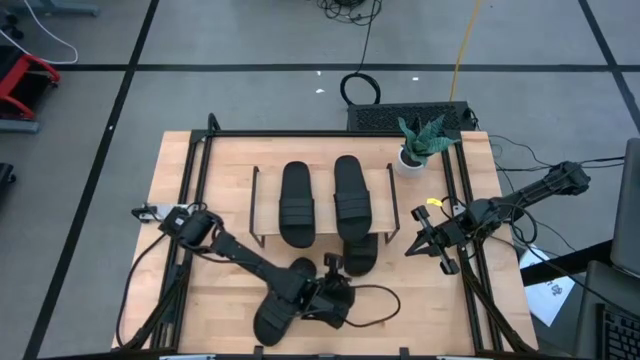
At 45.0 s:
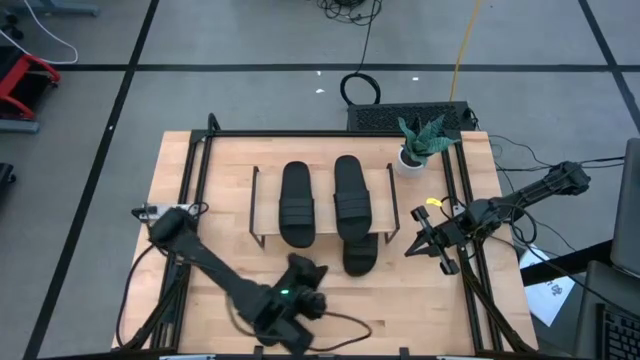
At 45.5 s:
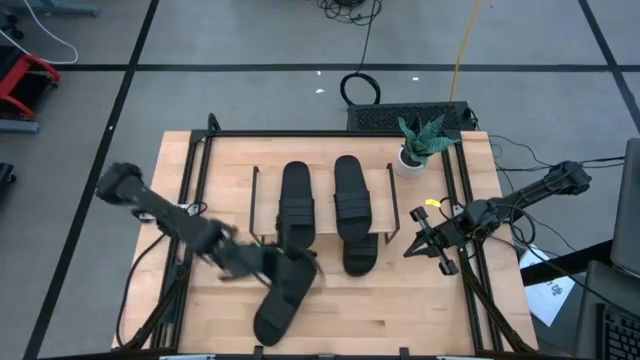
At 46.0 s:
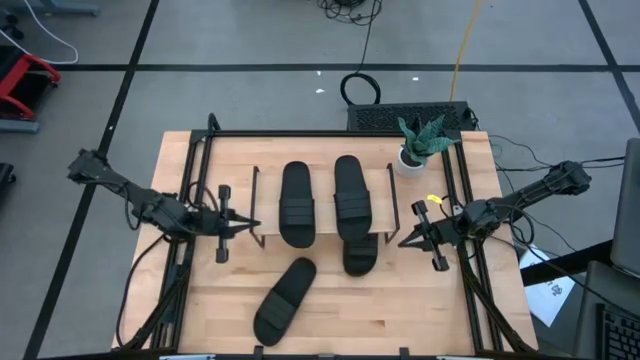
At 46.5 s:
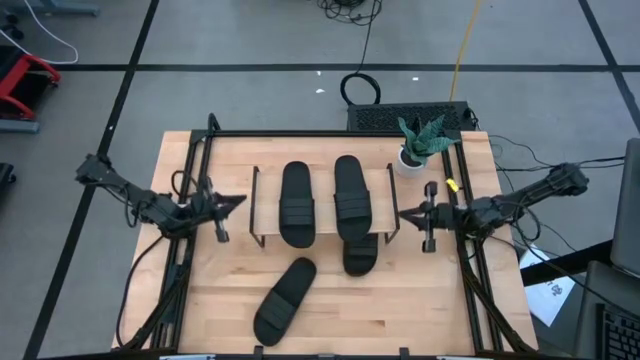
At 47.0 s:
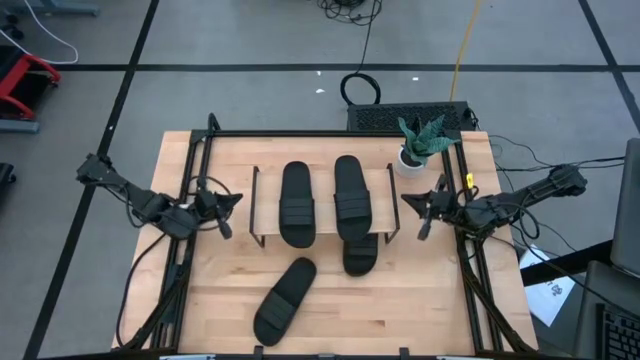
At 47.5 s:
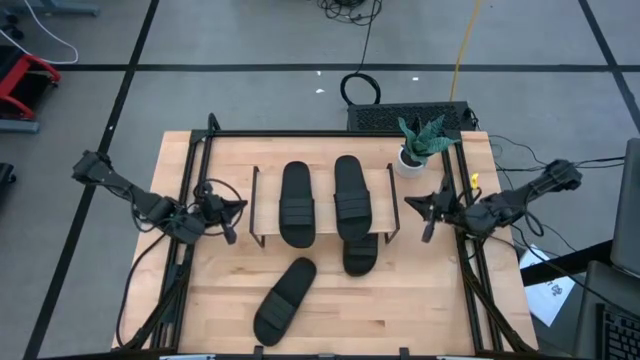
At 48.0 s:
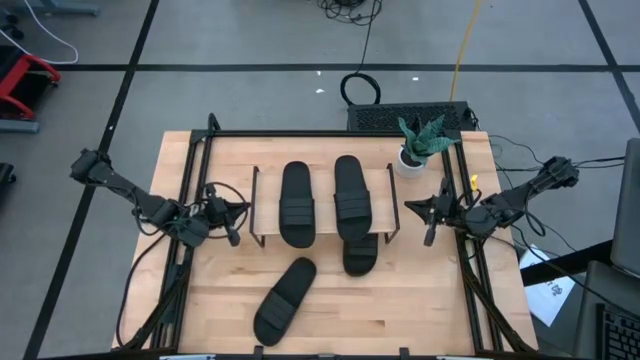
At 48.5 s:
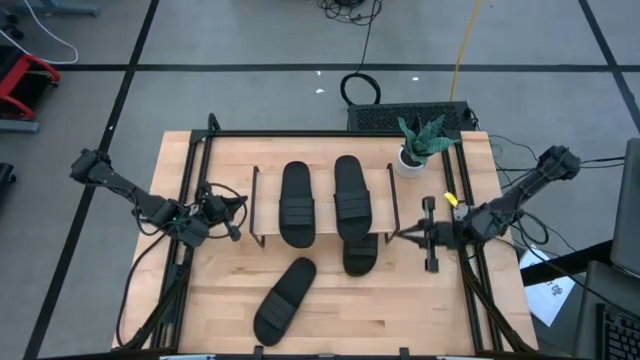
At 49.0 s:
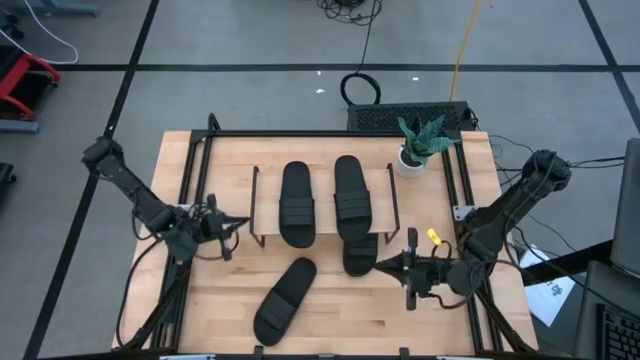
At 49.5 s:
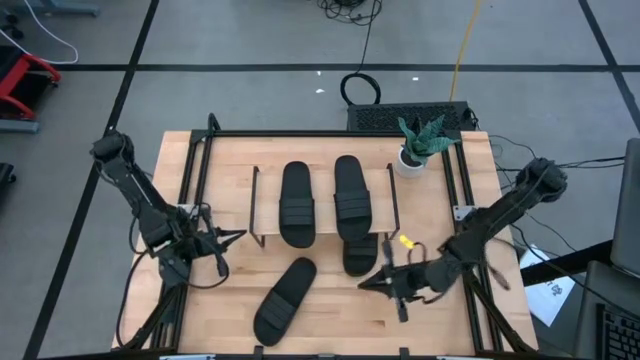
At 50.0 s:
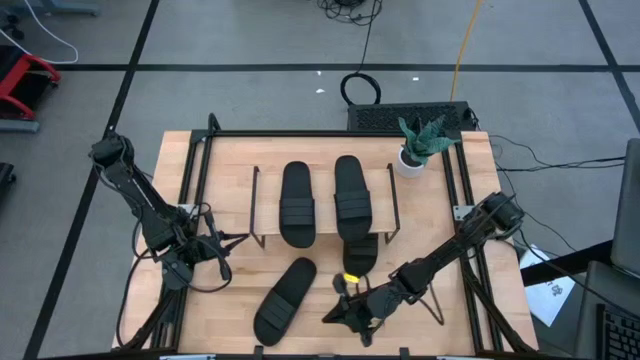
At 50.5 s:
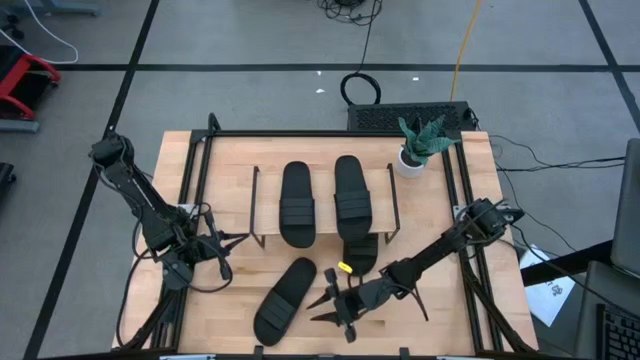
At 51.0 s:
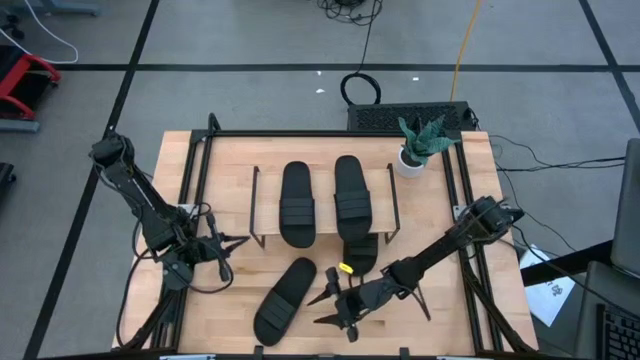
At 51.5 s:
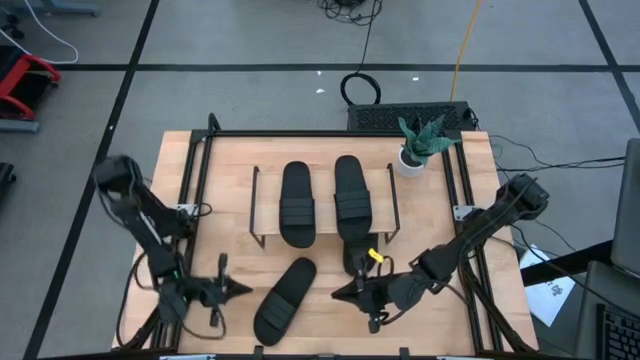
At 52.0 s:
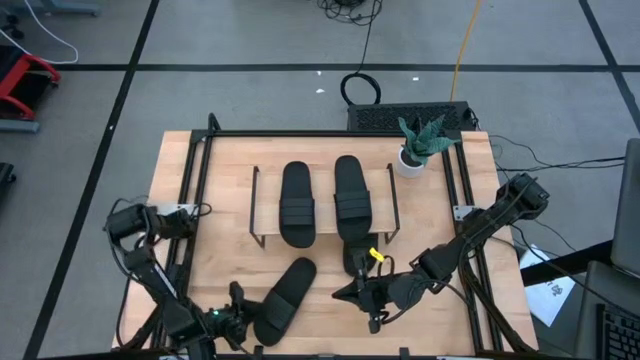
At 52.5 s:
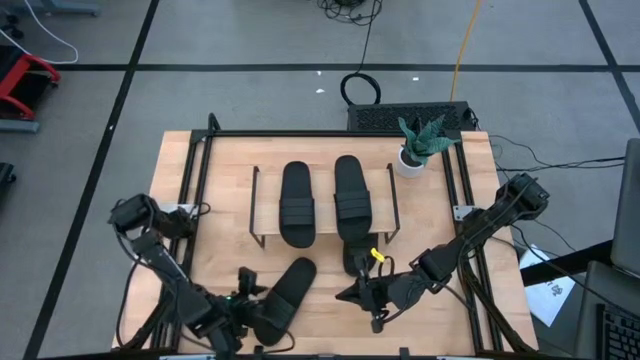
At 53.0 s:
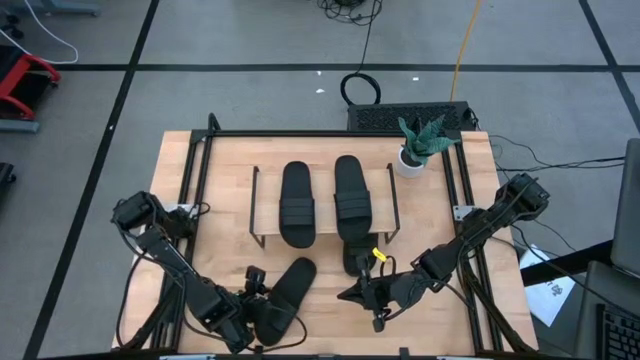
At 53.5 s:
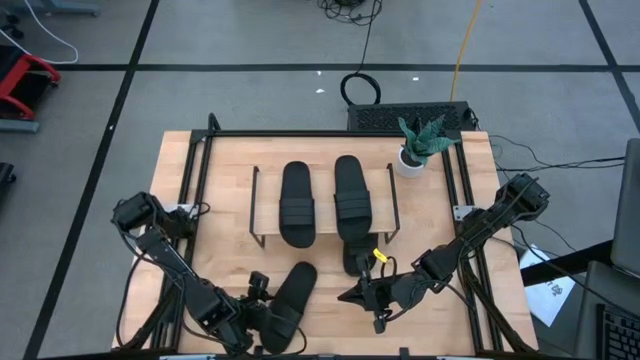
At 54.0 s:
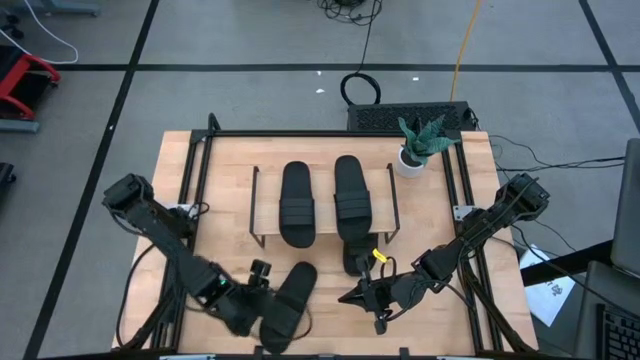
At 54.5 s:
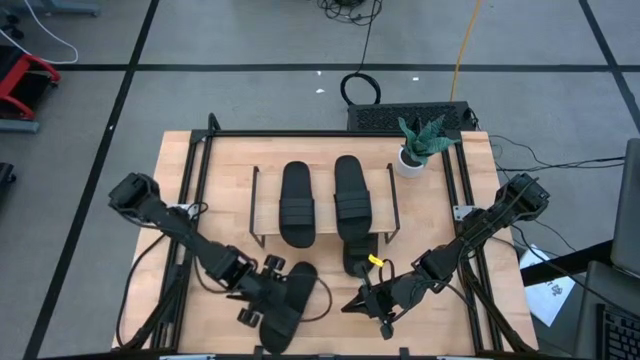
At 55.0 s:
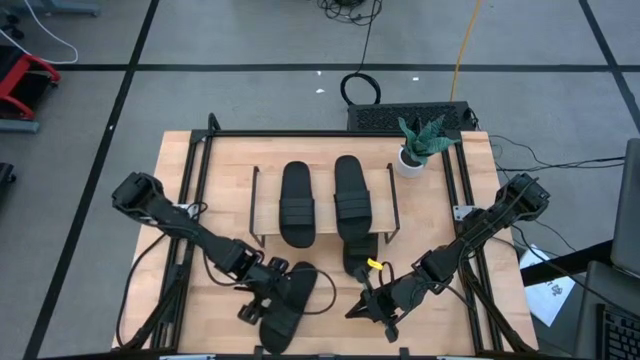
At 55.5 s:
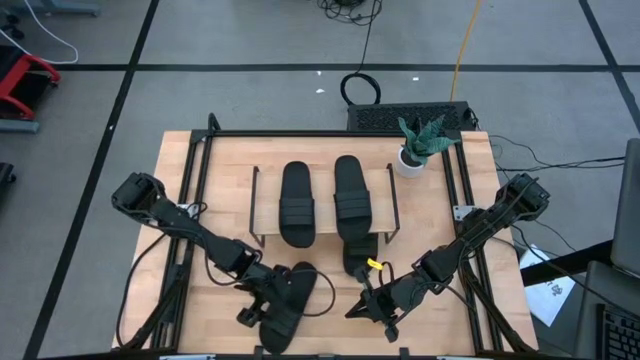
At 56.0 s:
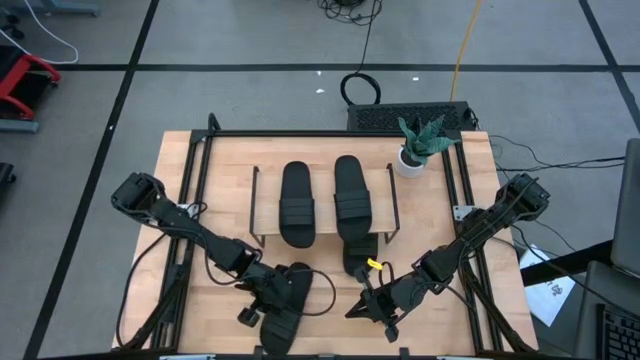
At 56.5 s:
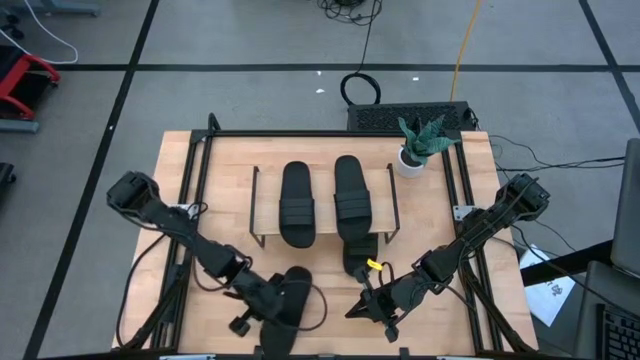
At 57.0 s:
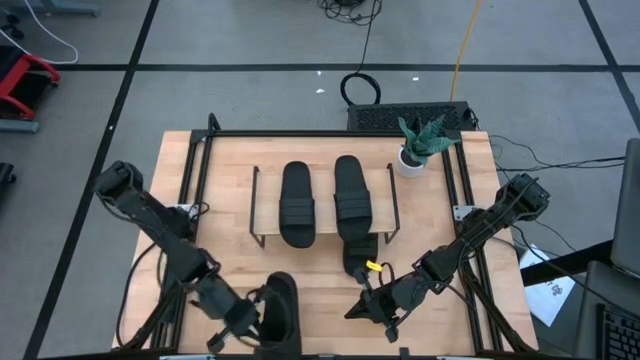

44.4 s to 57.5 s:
Task: Pick and place slides into the shelf
Put the black slide under the shelf

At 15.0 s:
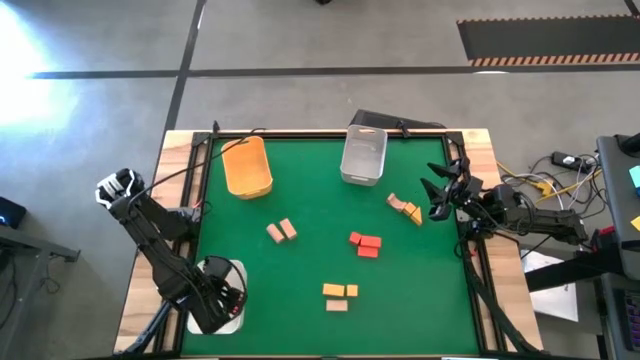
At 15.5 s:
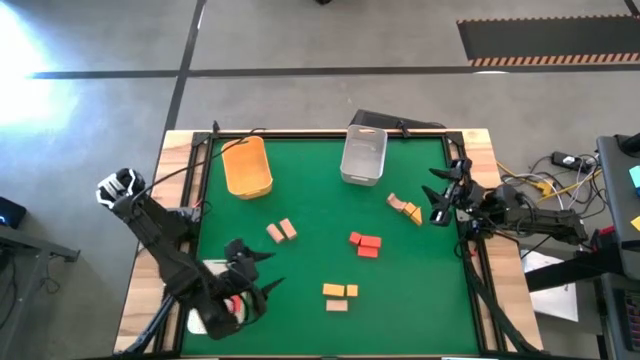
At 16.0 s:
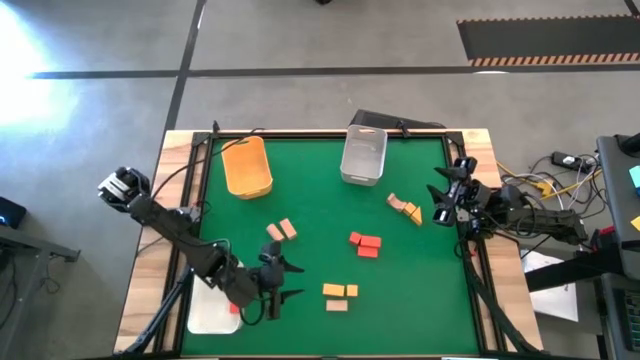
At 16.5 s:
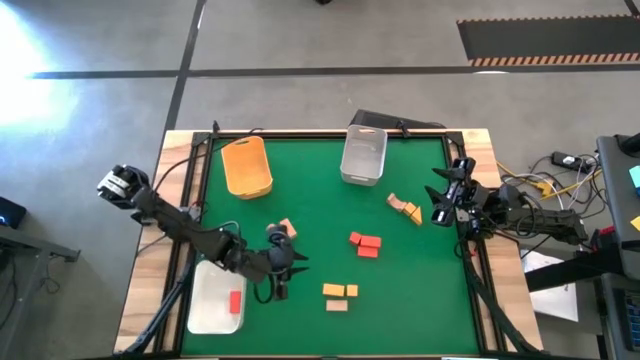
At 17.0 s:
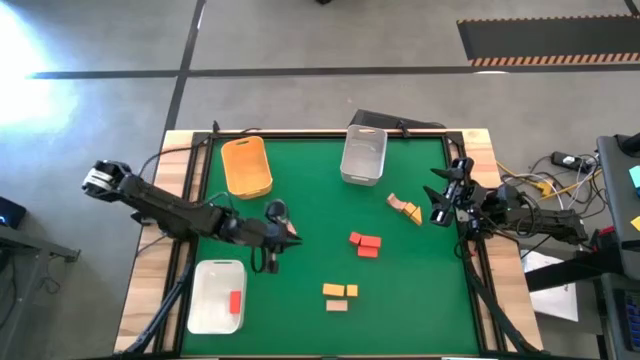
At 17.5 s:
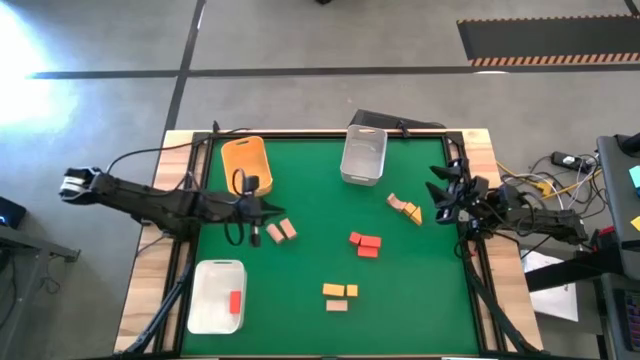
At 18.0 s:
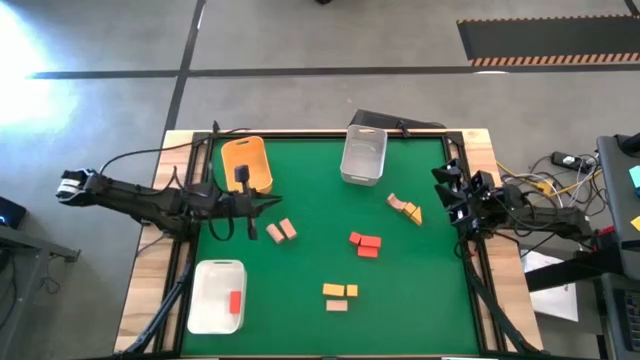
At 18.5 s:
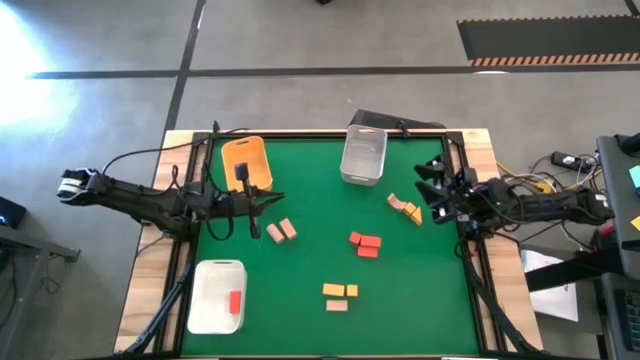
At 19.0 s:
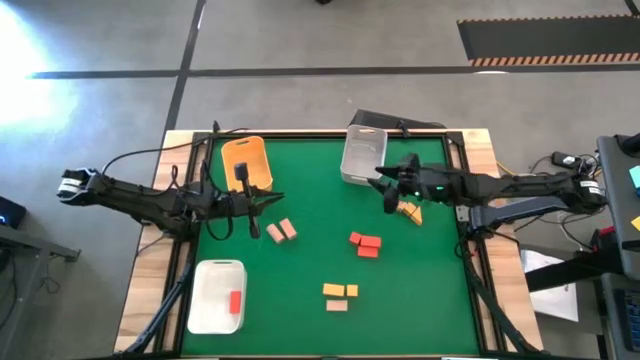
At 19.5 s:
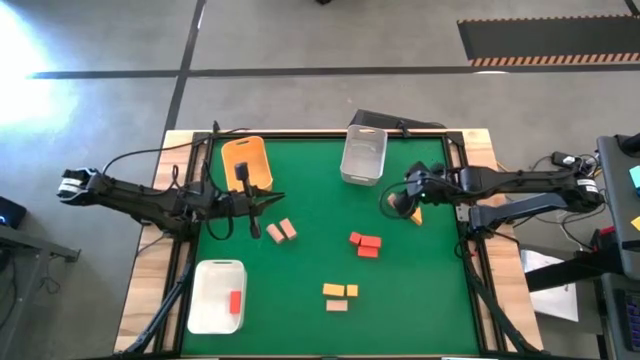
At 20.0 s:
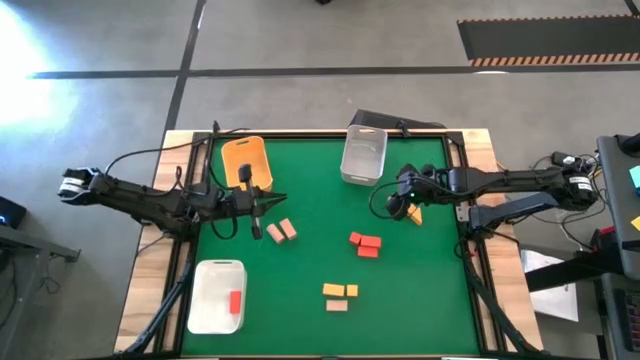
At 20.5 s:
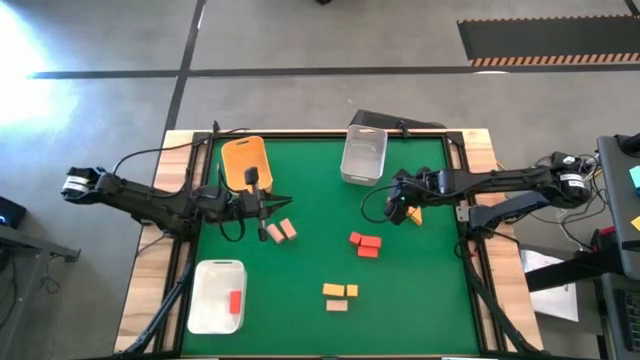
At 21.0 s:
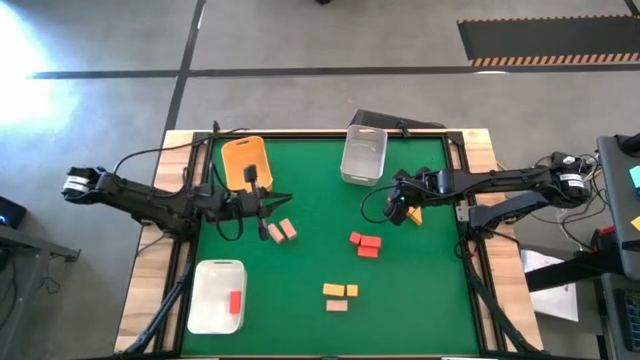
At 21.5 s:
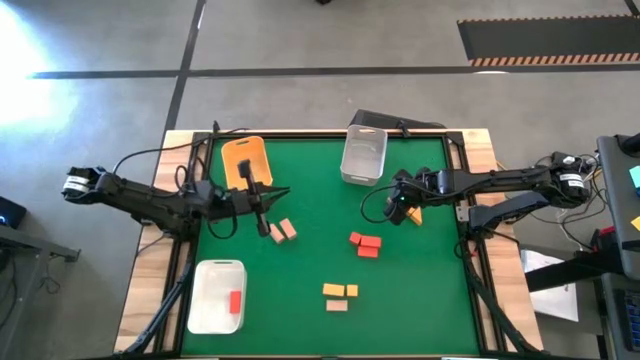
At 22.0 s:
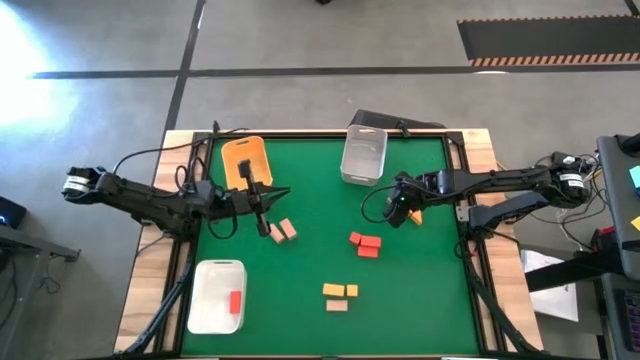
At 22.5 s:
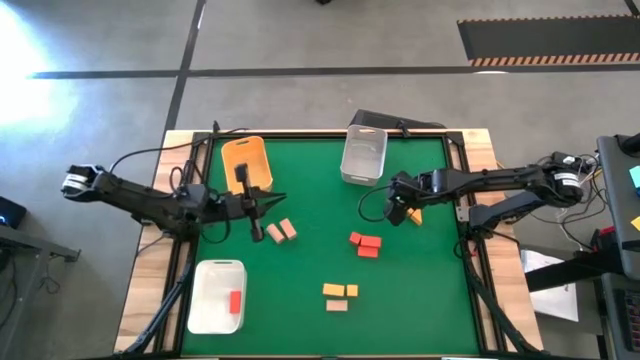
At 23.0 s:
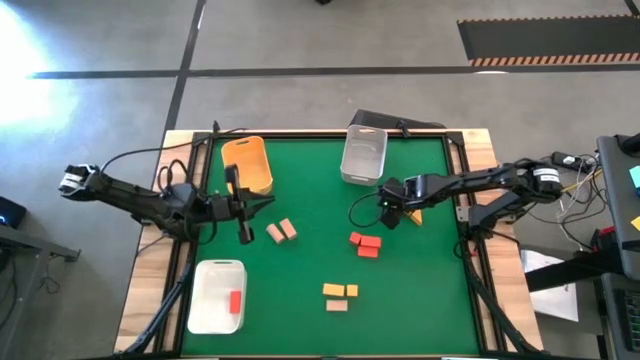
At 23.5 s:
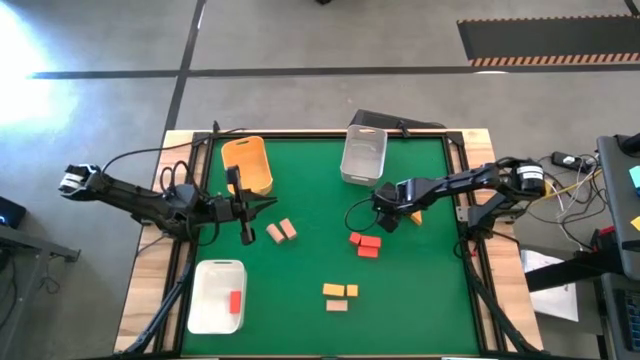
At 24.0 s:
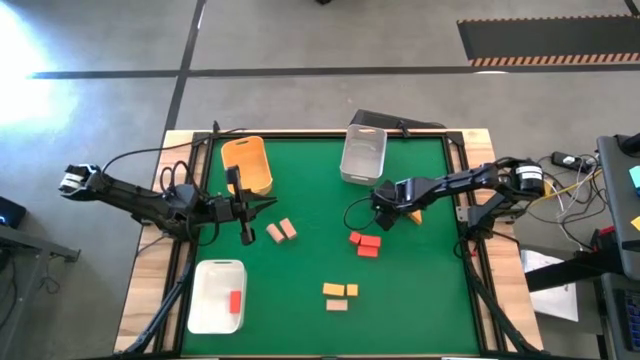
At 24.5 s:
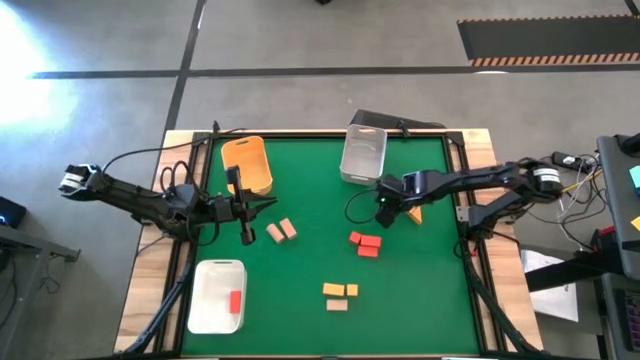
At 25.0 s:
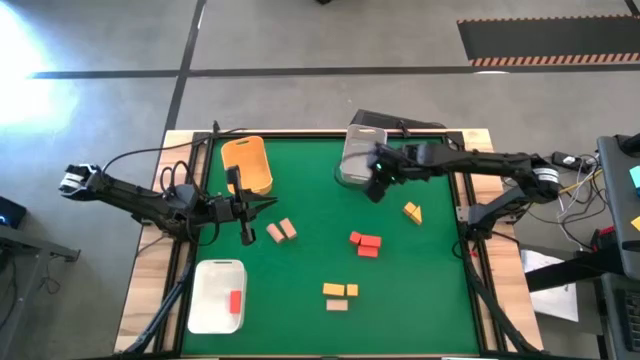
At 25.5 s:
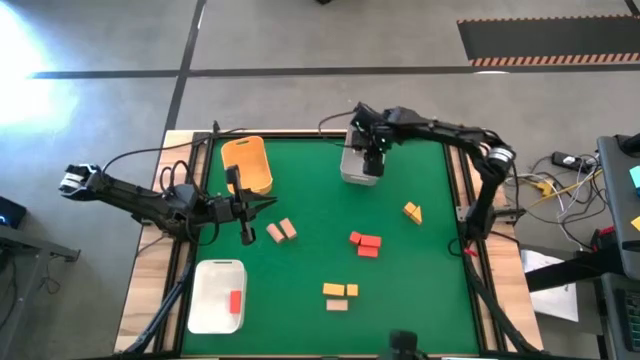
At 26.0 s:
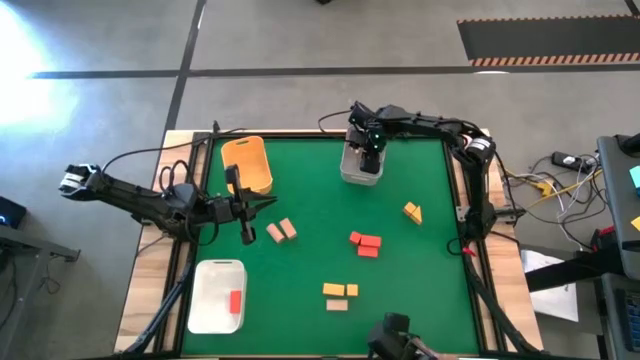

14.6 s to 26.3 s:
Task: Sort & place blocks by color
Put the brown block into the gray bin
